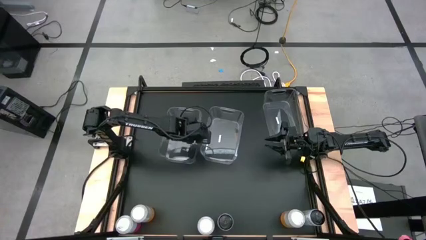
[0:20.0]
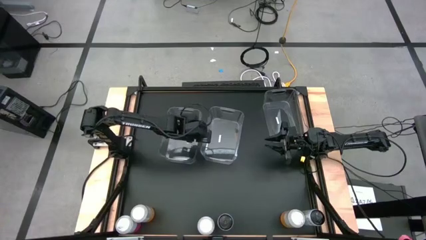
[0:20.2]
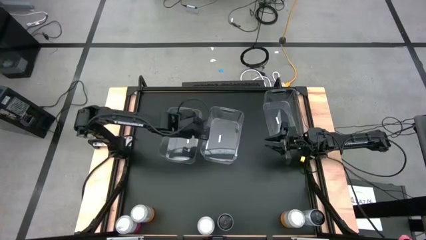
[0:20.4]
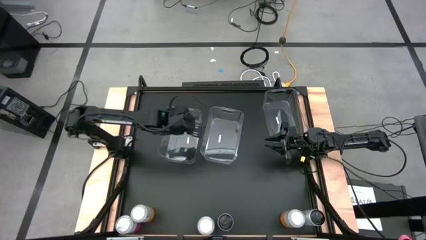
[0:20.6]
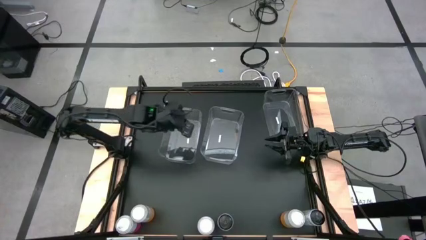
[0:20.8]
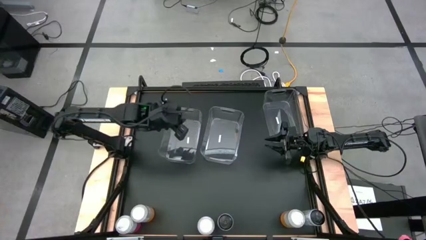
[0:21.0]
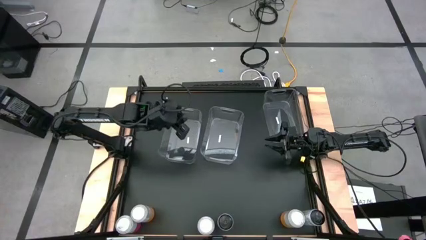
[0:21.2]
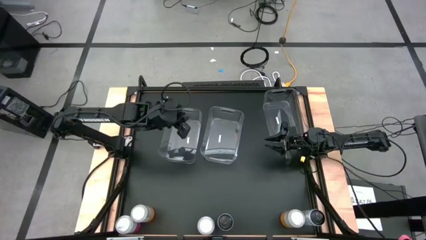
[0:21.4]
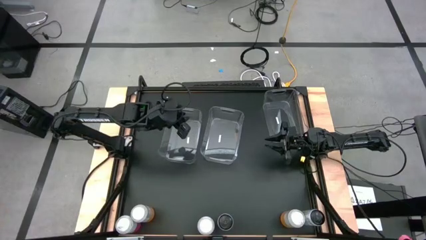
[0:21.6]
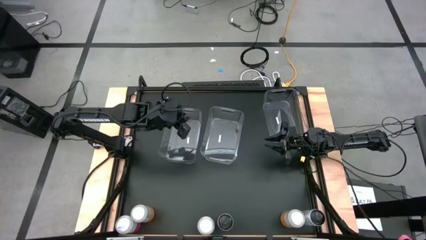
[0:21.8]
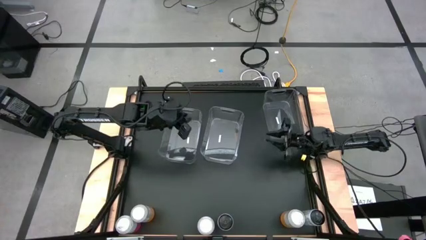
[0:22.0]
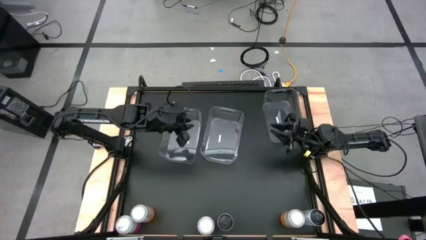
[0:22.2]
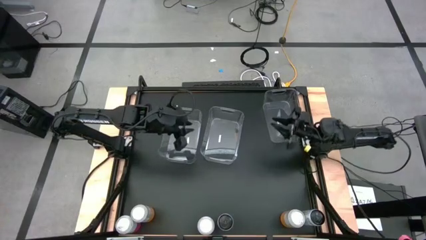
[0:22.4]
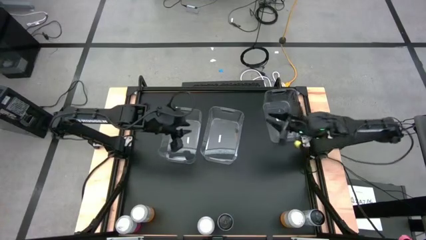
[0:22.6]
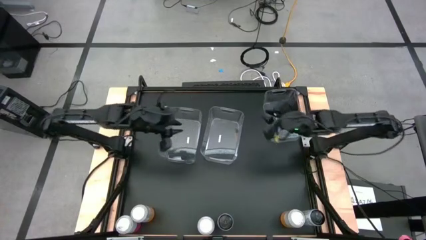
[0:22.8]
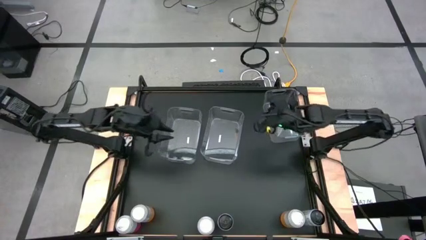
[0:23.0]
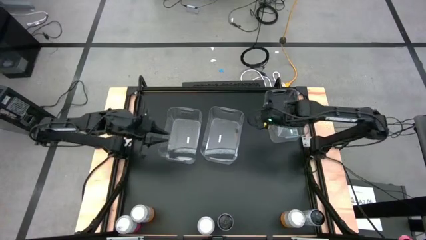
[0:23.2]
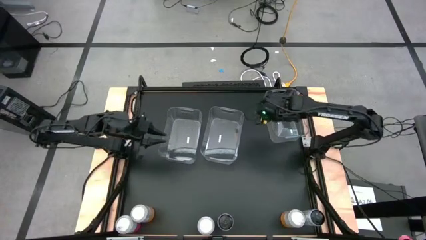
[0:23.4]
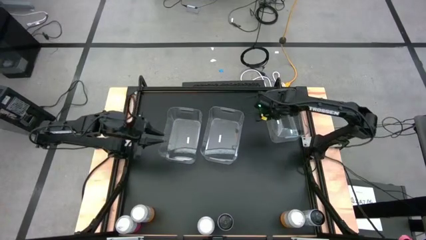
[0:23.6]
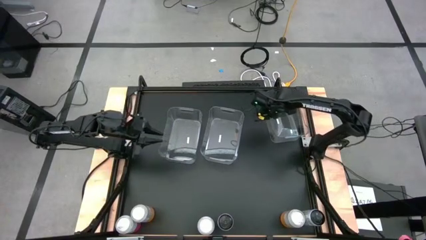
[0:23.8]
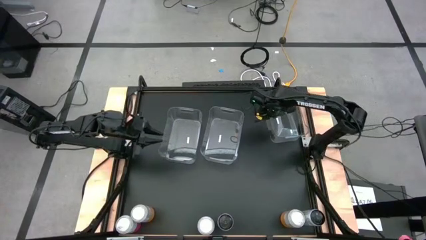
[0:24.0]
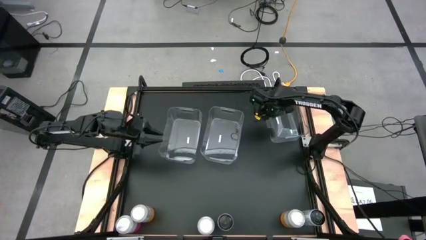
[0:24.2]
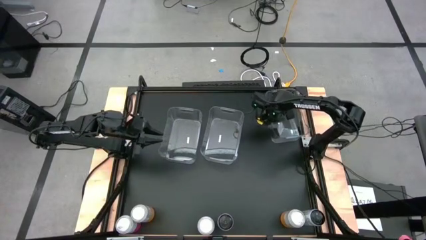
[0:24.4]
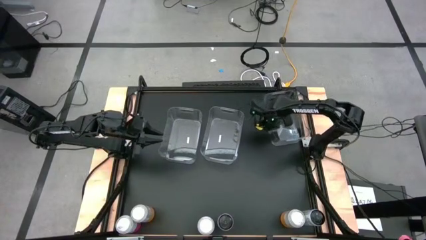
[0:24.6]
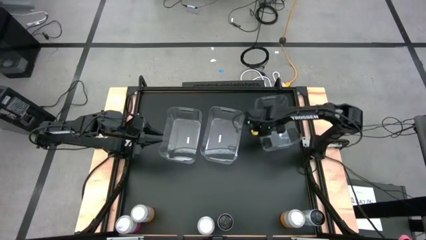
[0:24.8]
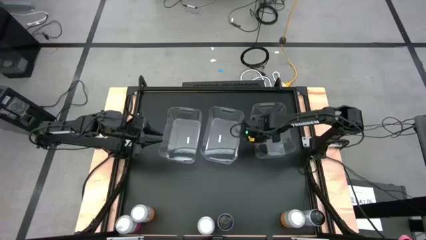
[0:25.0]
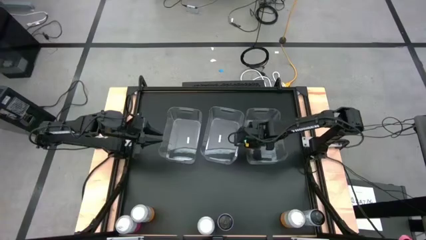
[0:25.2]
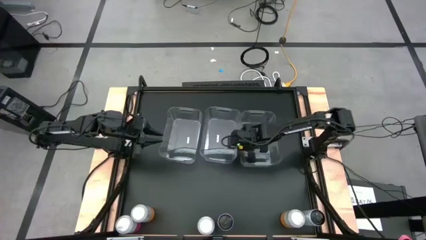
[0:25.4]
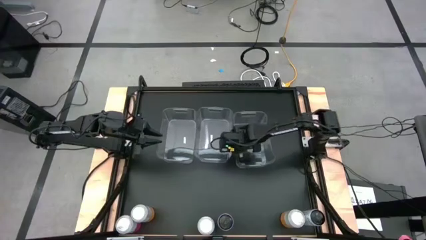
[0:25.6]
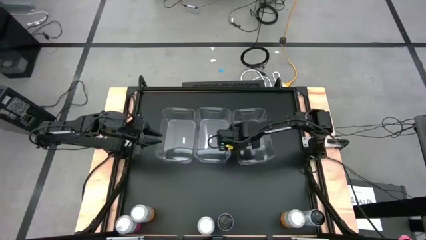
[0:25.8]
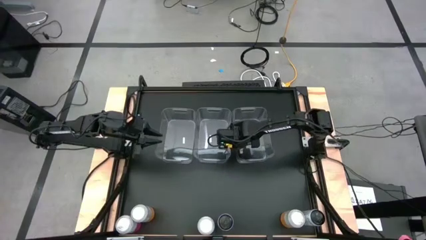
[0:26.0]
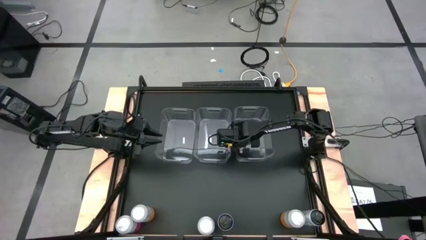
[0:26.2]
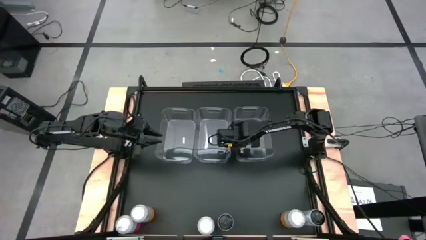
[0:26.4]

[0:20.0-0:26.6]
Task: Sort soda cans
Move the right transparent bin to the center of the table

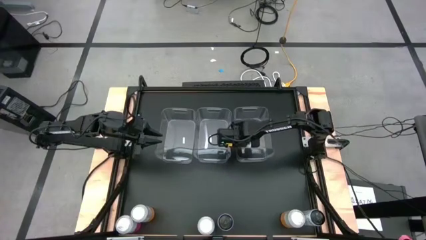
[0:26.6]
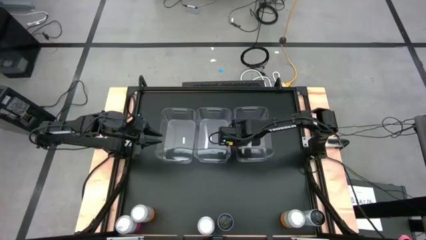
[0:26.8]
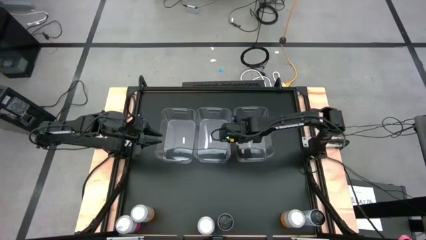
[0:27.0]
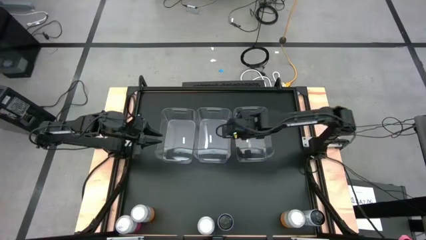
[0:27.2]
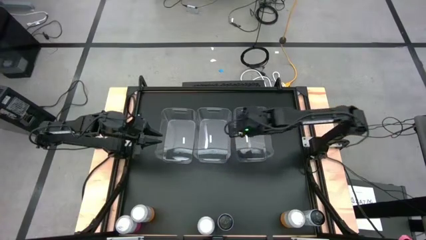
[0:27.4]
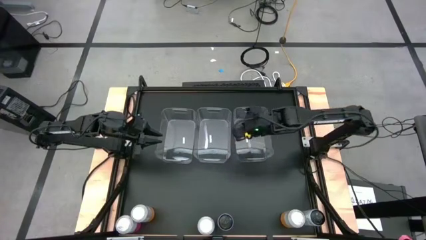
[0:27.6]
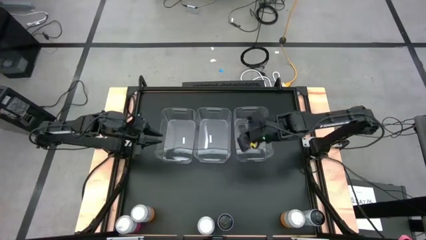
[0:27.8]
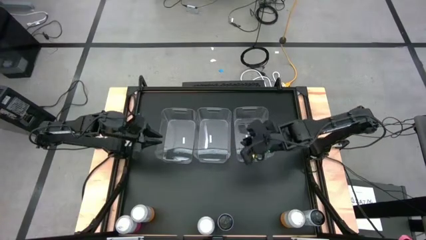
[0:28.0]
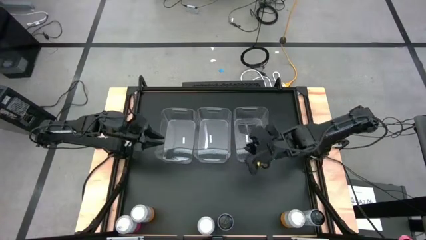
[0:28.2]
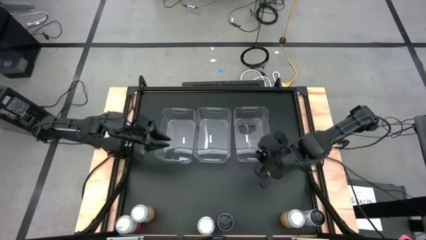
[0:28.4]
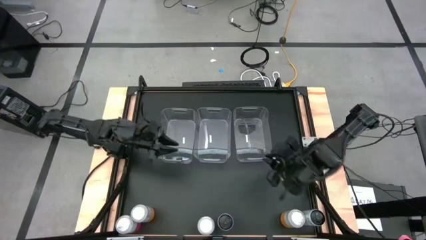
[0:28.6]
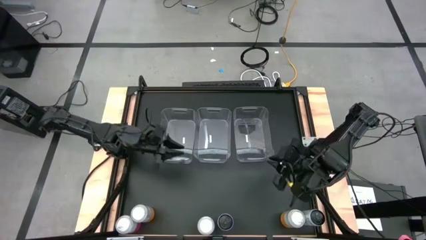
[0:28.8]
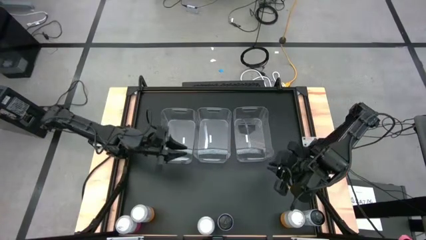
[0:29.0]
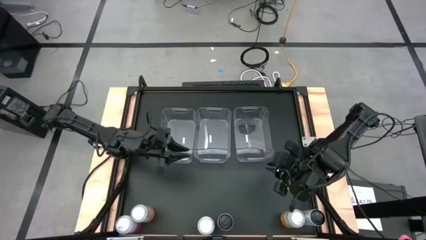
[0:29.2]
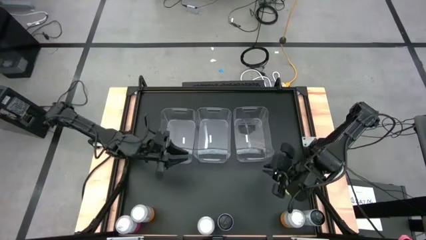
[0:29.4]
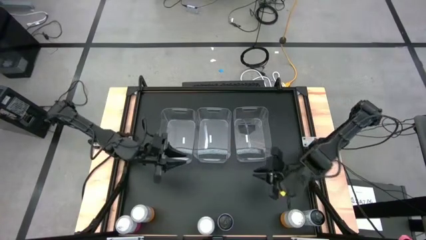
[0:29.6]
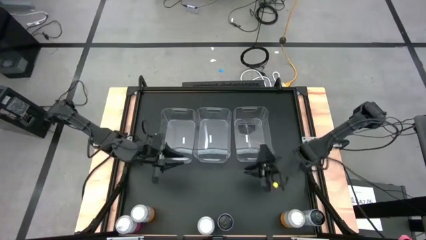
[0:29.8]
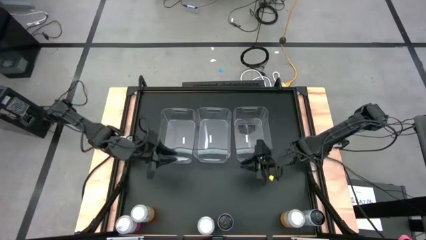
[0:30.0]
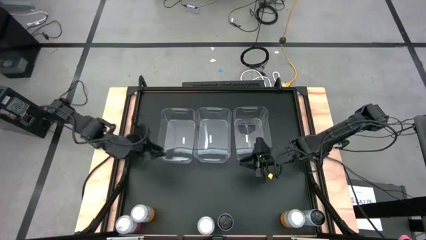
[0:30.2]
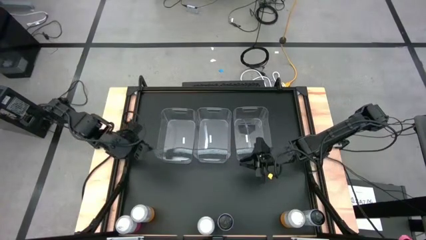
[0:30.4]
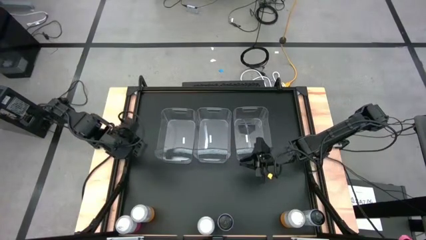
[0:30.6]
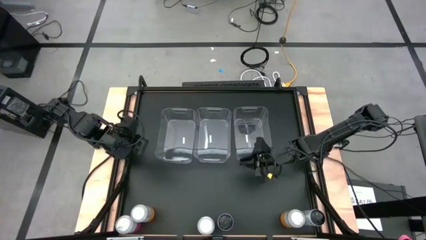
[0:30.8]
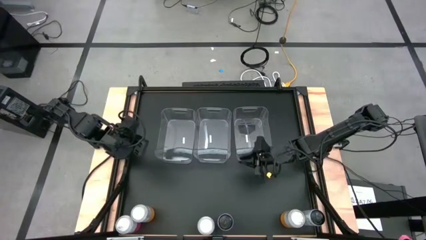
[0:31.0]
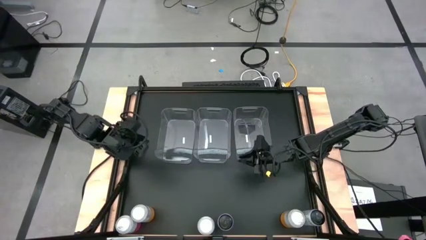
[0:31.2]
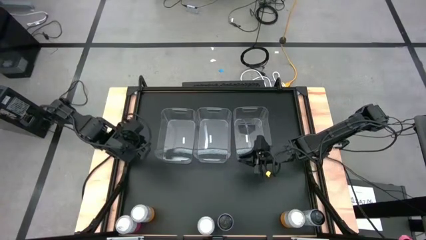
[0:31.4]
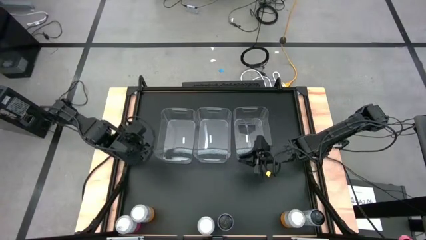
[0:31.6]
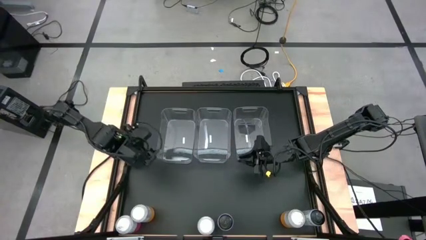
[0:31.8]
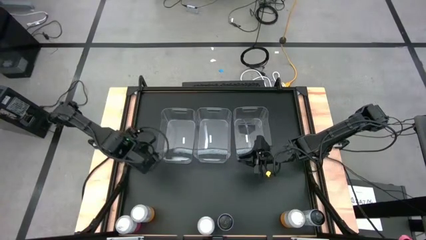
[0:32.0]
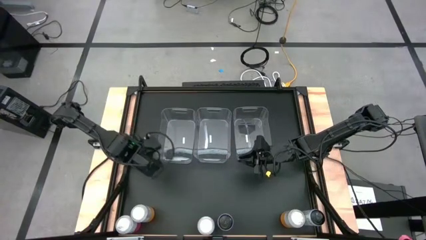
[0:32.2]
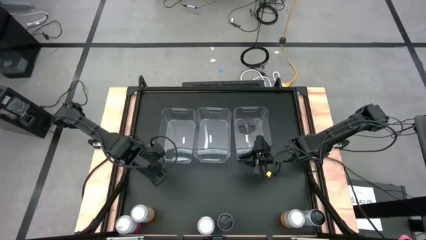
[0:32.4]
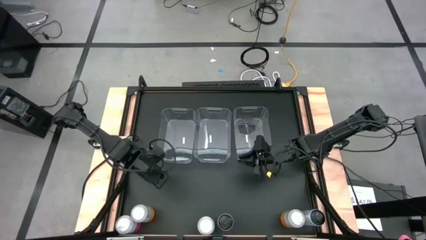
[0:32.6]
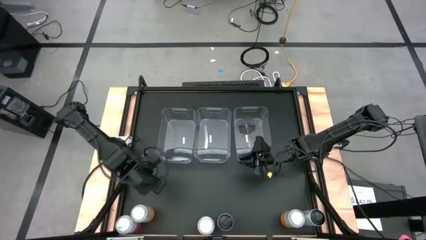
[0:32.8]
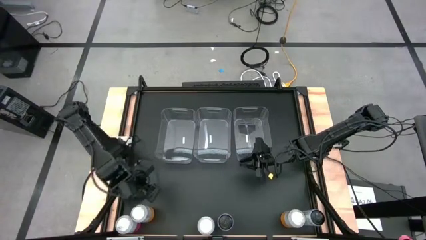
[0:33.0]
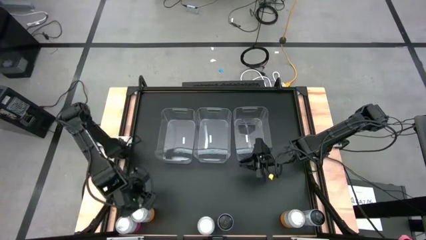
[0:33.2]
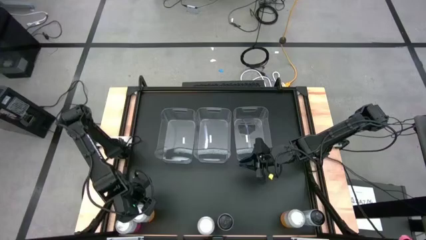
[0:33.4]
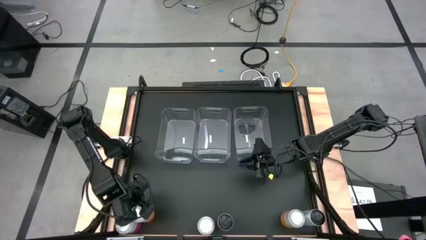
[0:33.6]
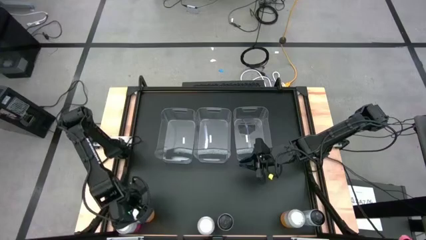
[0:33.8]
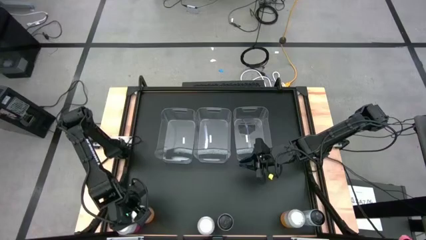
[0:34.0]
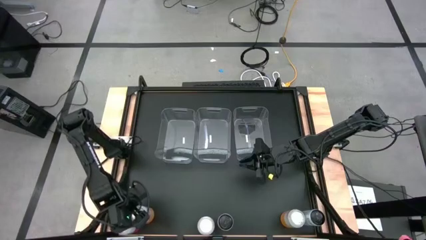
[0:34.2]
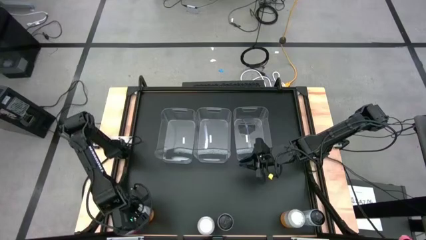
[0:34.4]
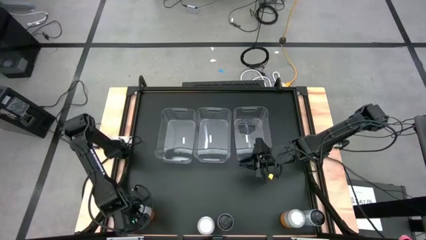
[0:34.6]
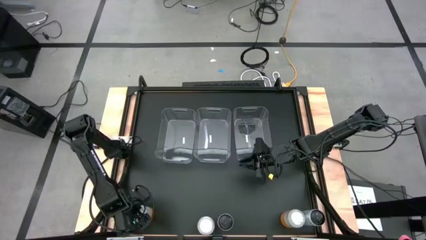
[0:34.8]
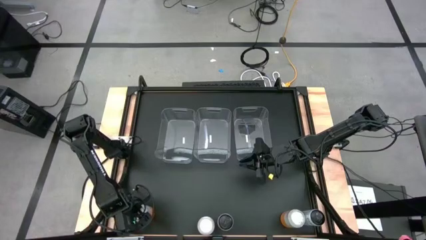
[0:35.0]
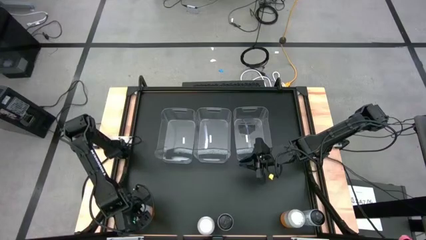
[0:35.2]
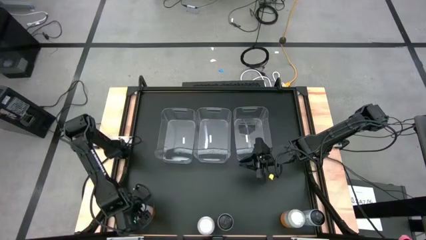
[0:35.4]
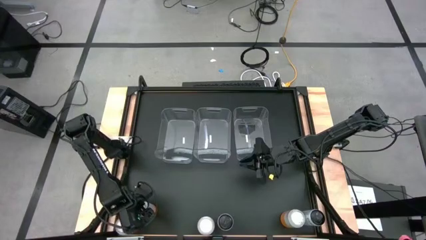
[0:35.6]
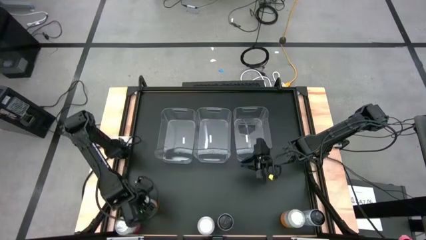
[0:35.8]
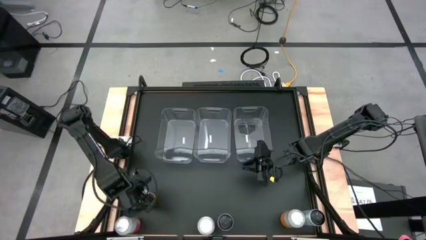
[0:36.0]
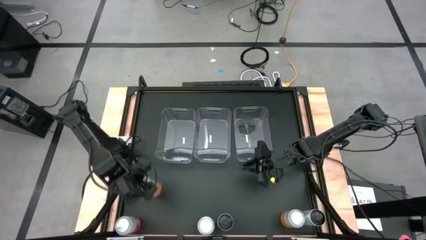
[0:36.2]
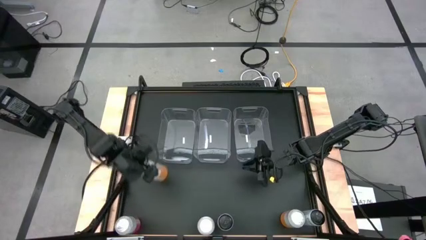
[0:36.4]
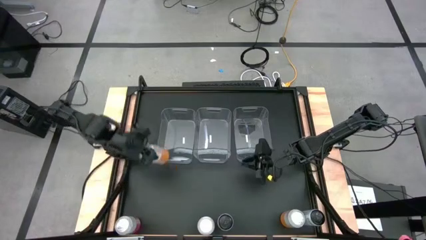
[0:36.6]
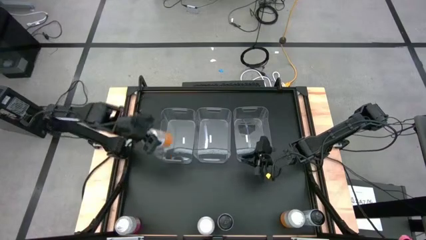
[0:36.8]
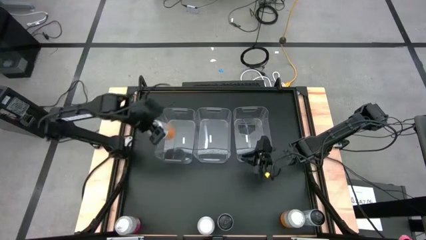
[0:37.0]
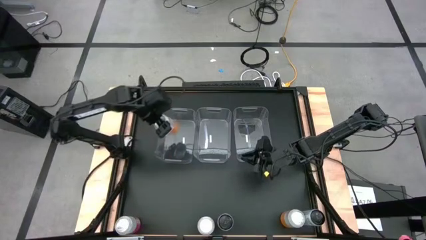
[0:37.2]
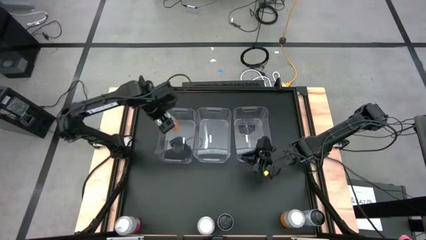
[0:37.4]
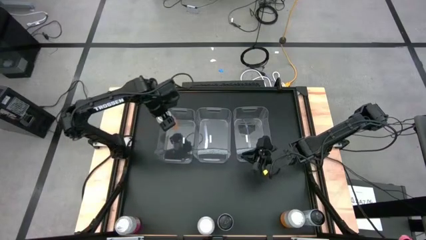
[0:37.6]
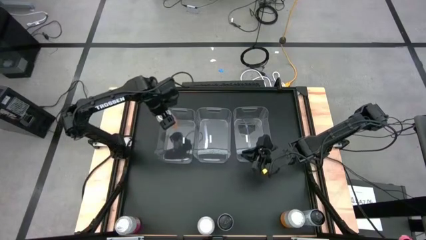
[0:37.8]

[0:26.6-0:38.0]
Put the left yellow-white soda can into the left transparent bin
